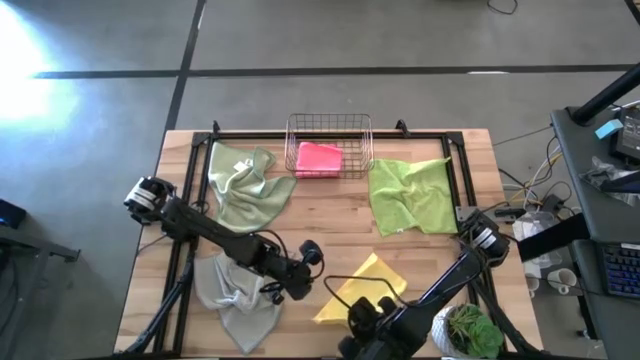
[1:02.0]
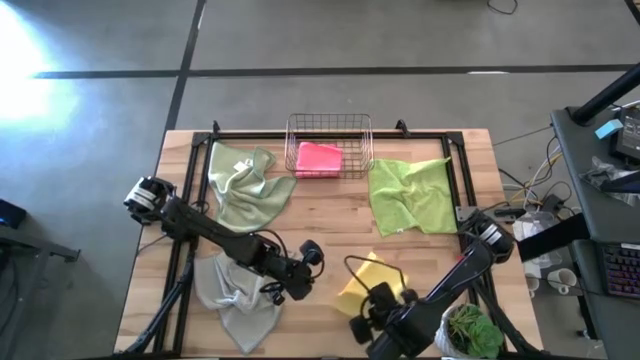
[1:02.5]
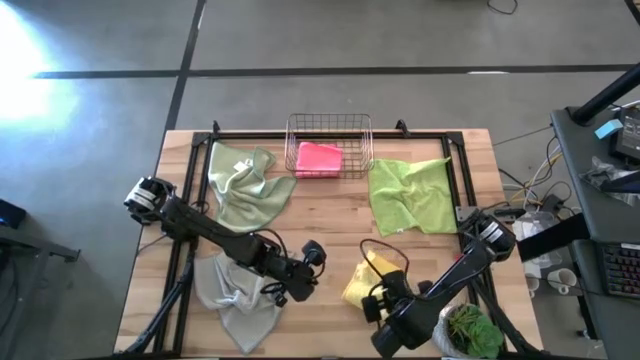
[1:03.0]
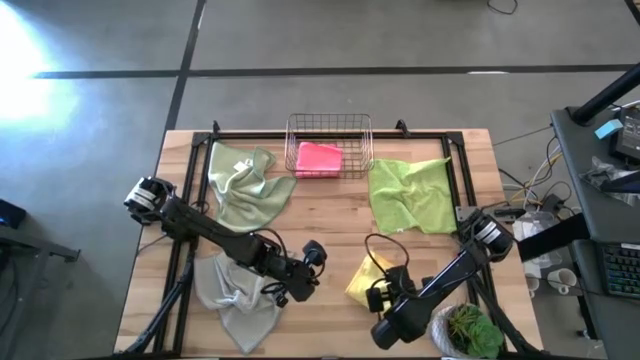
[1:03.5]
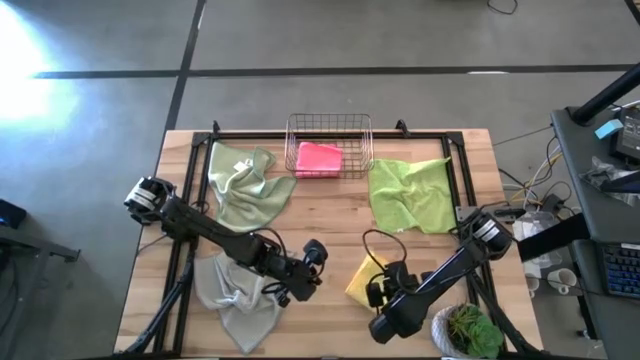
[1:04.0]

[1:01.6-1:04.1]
Task: Fold microfiber towels
Fold the yellow microfiber cloth

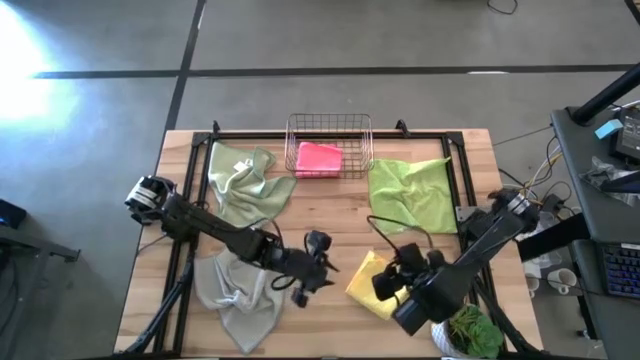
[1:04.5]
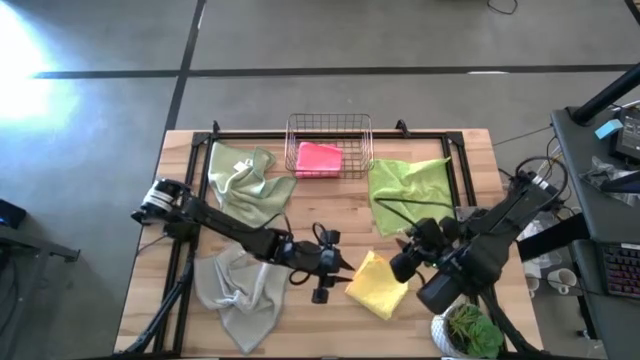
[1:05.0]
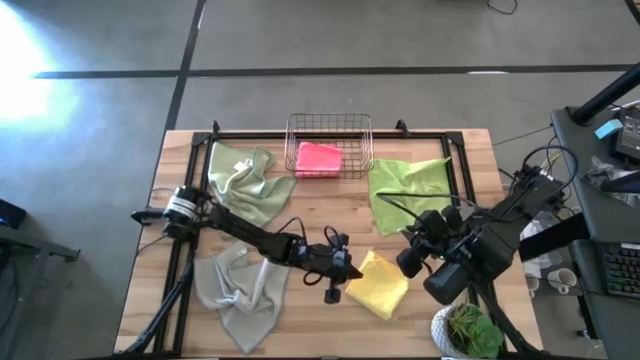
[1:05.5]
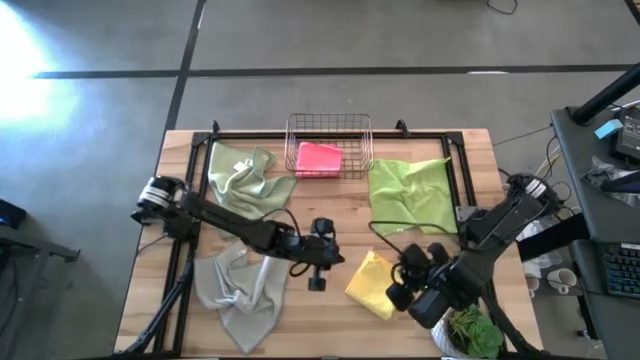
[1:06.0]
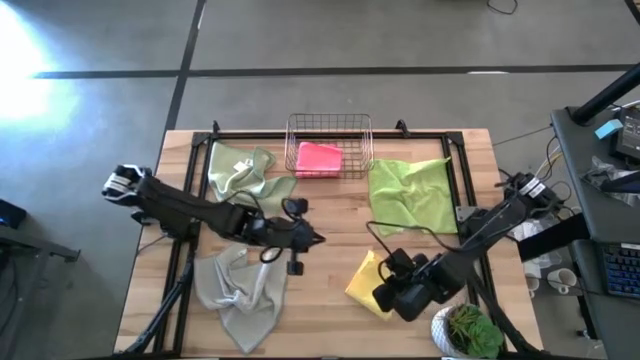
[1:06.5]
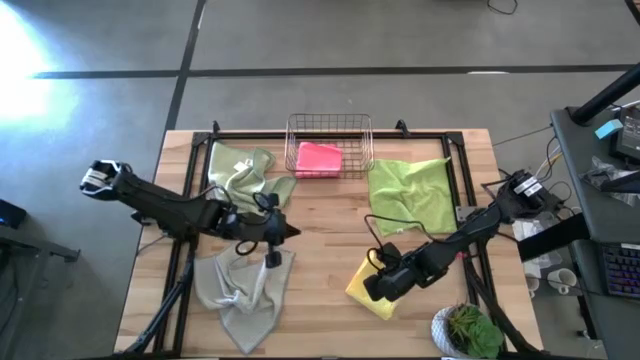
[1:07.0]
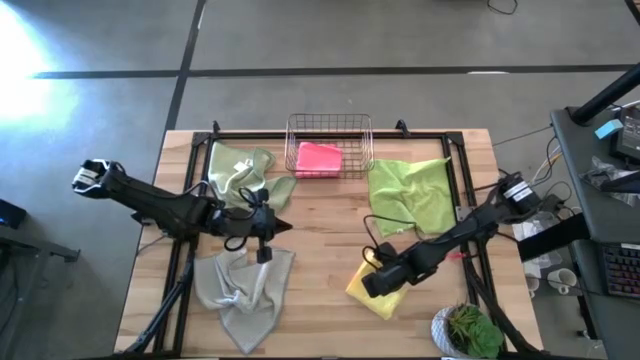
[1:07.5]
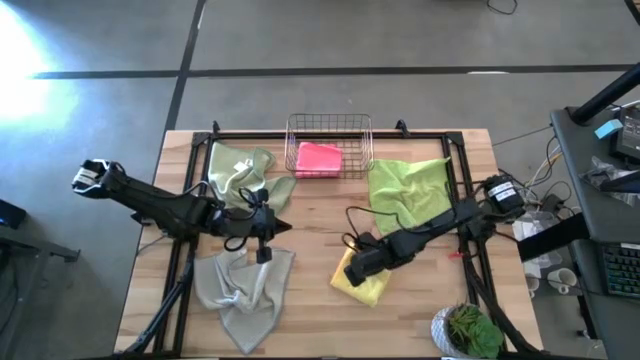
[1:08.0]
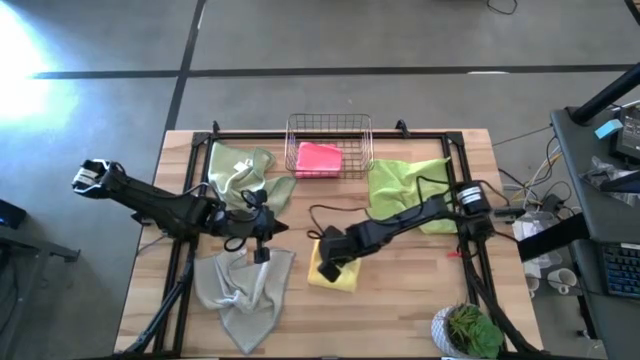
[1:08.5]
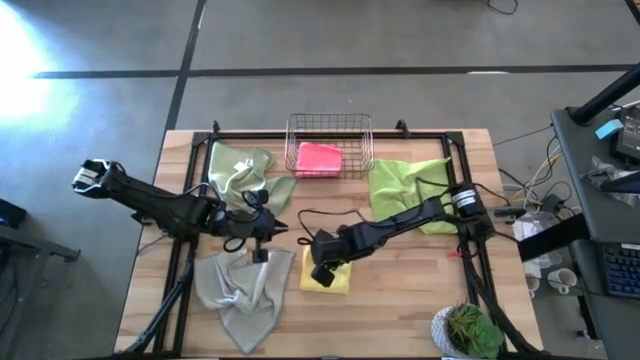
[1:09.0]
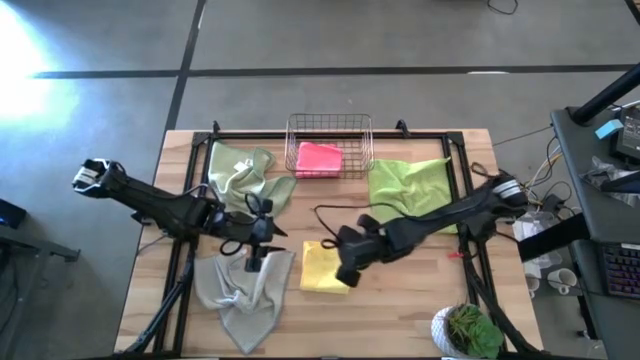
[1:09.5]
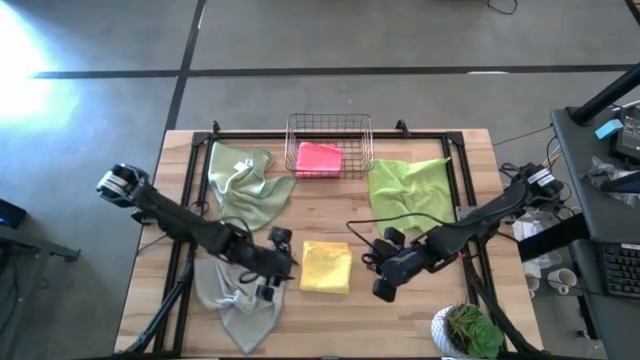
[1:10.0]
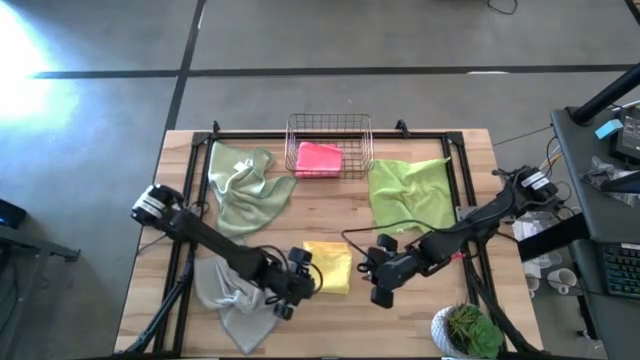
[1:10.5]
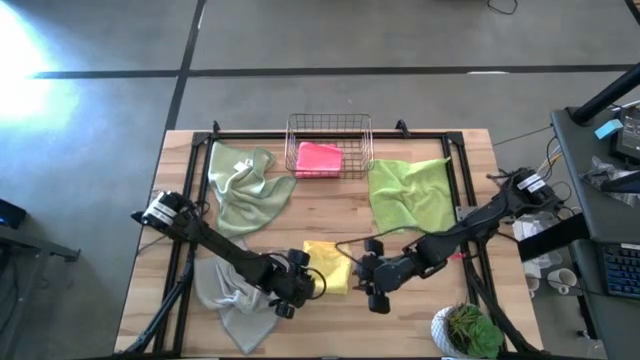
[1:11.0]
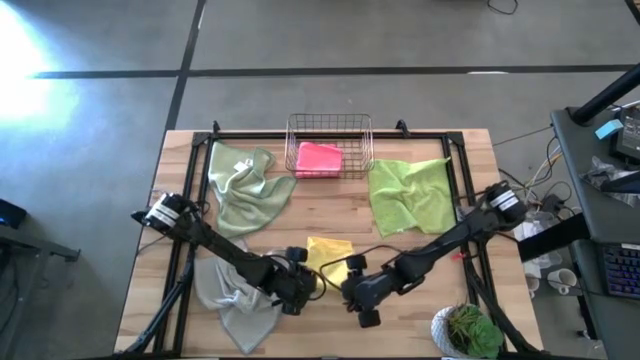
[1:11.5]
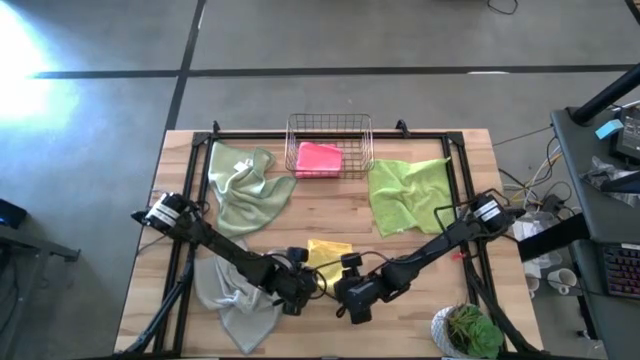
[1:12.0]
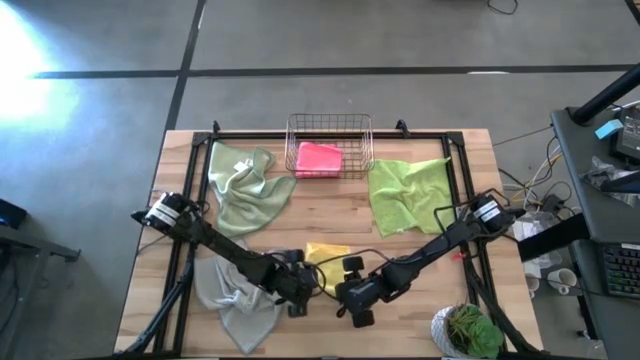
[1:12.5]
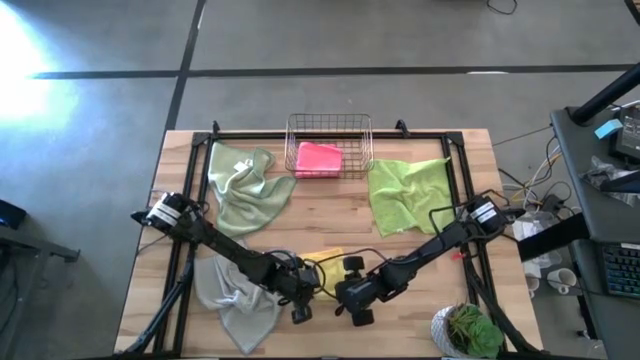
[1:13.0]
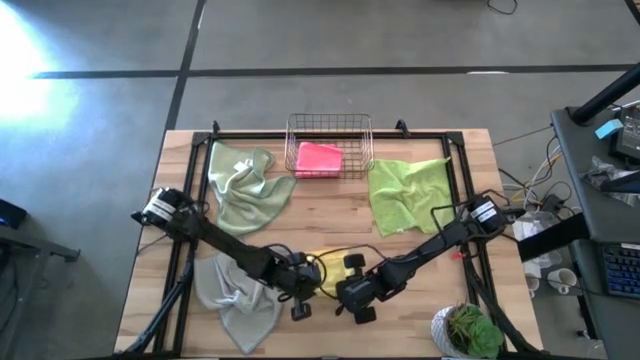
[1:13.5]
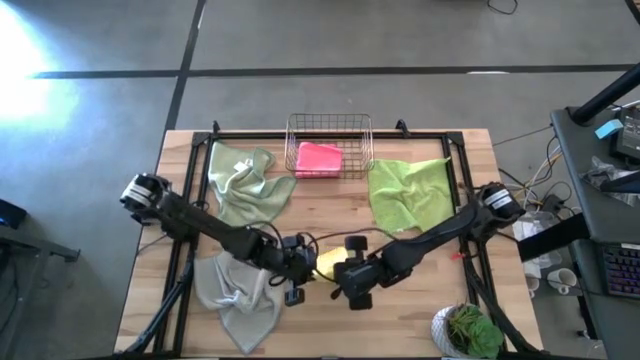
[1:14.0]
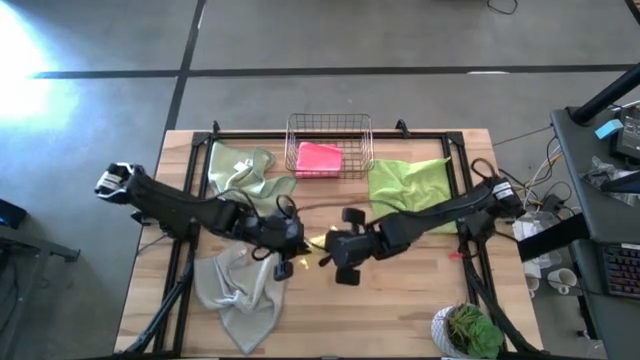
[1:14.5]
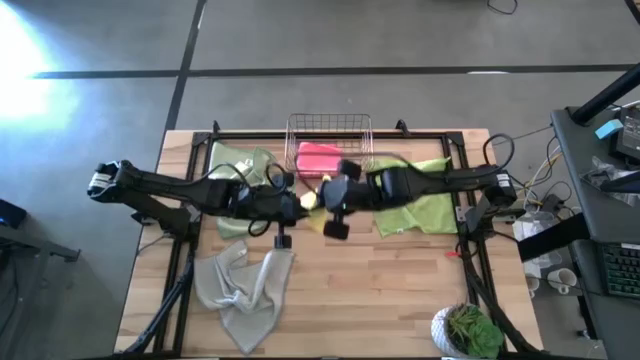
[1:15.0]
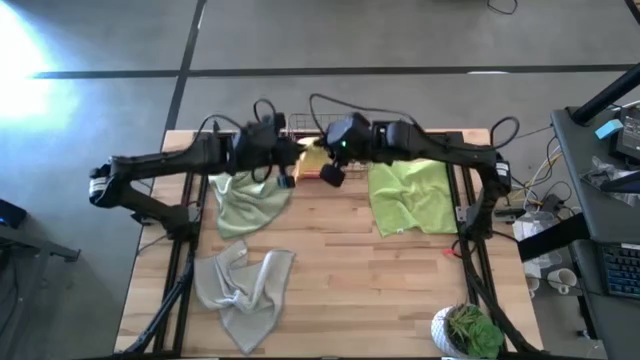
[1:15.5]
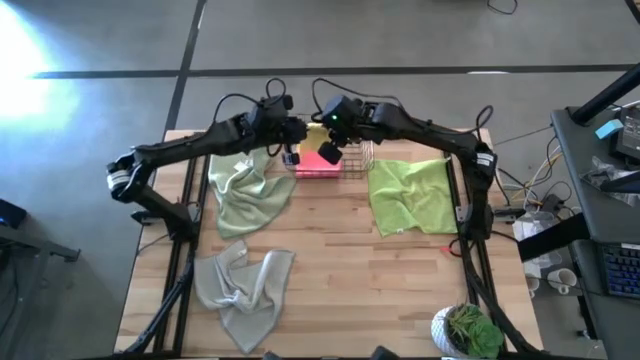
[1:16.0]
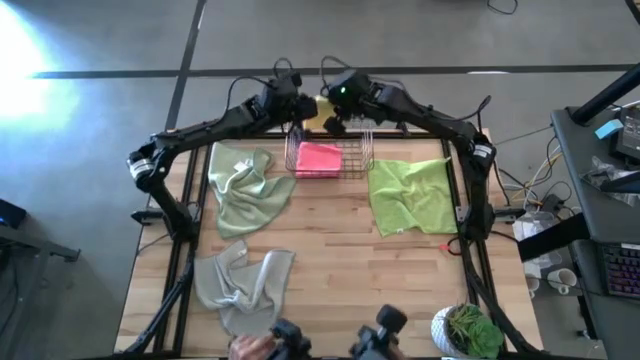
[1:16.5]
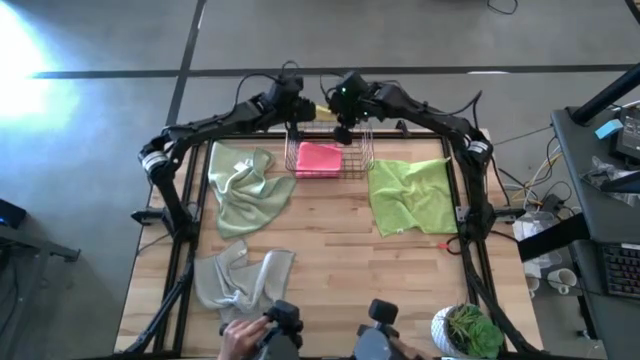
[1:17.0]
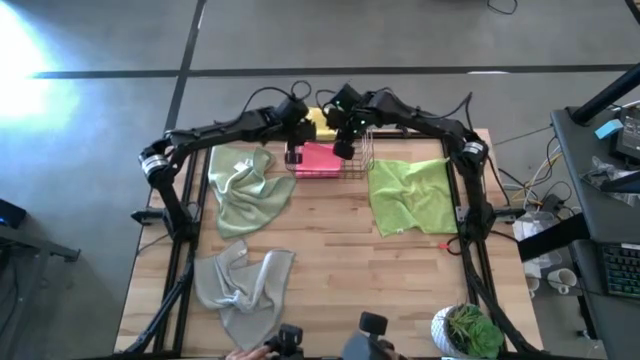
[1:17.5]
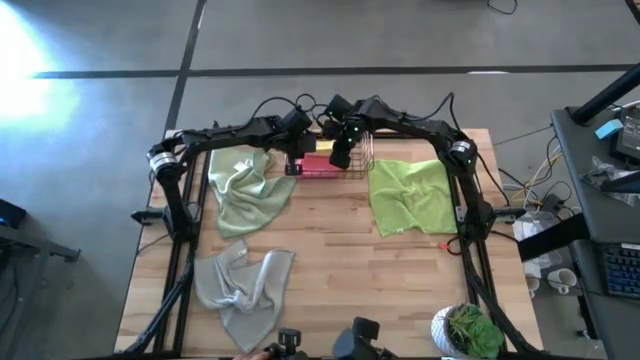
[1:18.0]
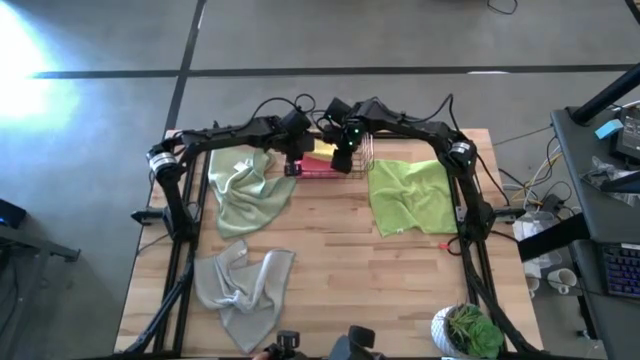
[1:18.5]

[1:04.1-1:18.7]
Stack the folded yellow microfiber cloth on top of the pink microfiber cloth in the wire basket

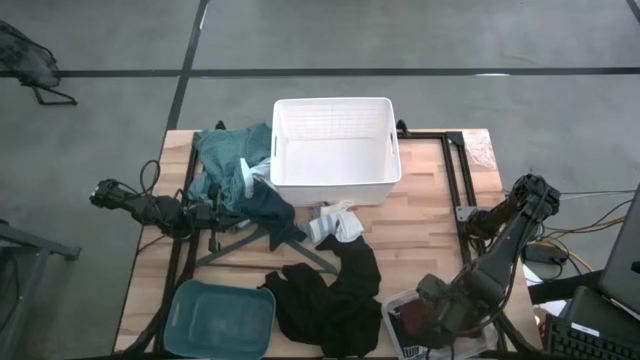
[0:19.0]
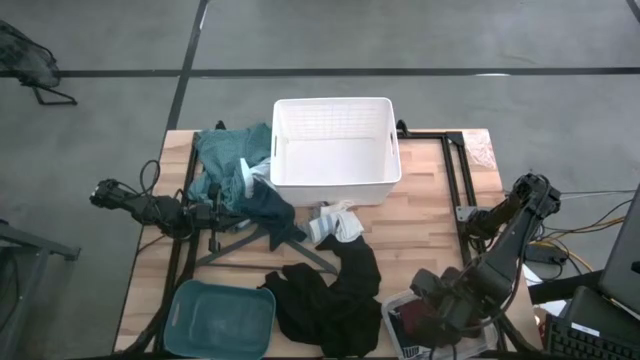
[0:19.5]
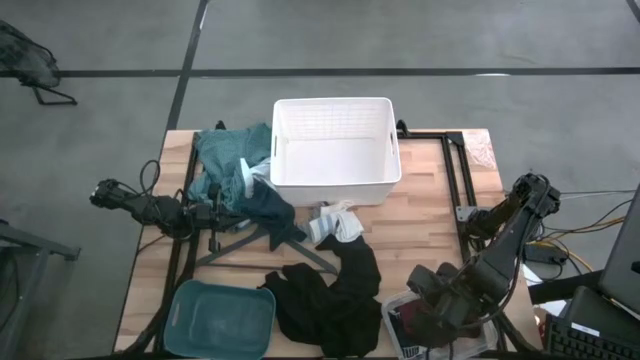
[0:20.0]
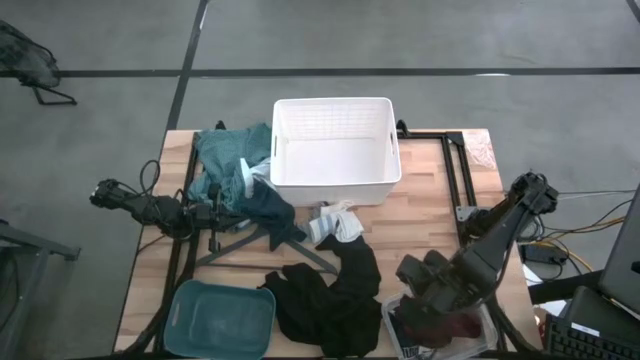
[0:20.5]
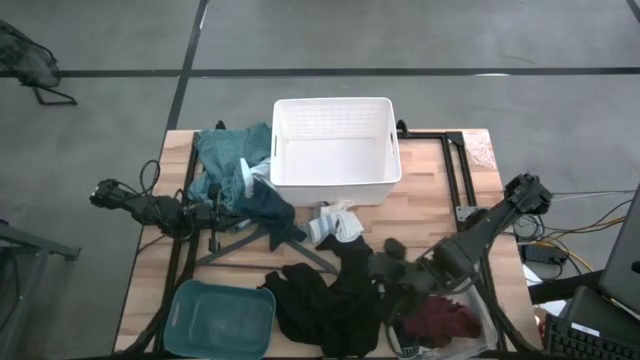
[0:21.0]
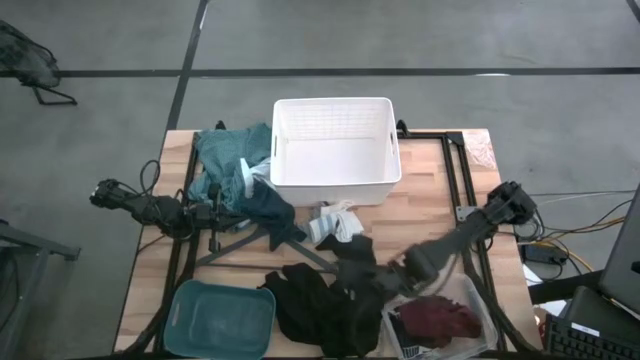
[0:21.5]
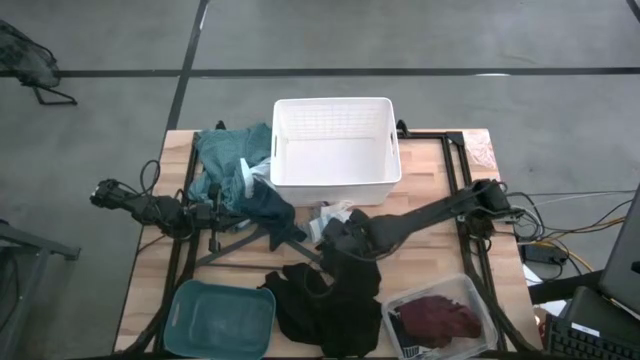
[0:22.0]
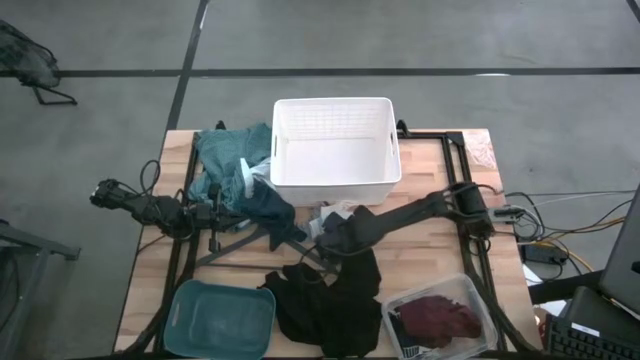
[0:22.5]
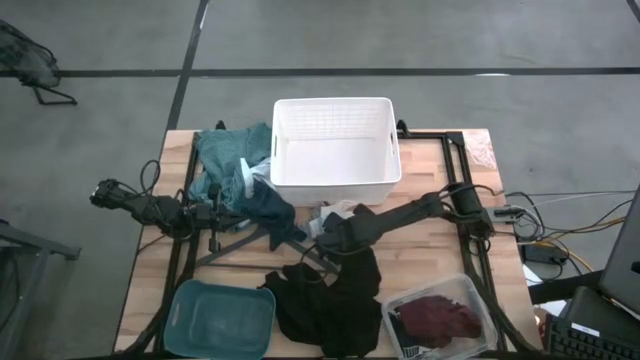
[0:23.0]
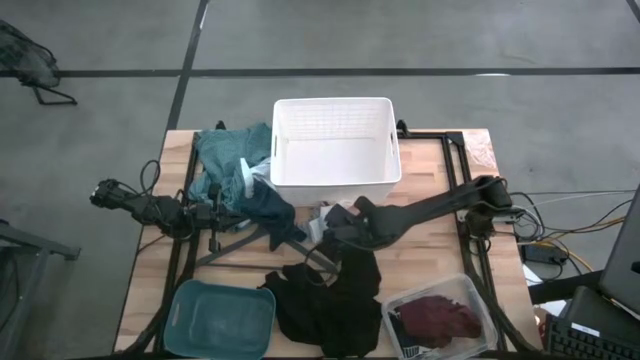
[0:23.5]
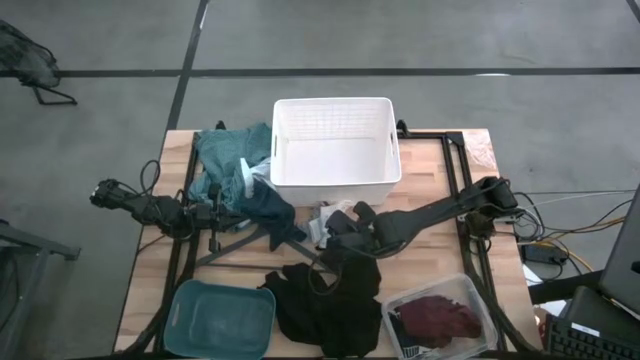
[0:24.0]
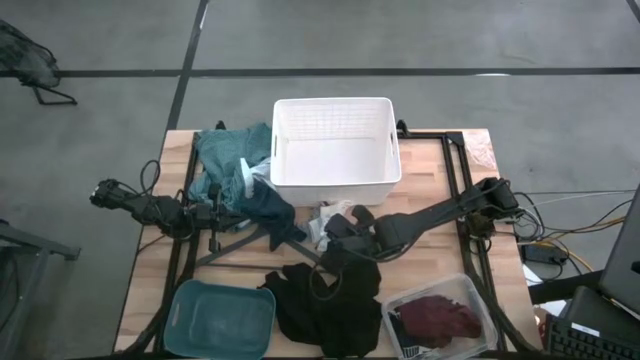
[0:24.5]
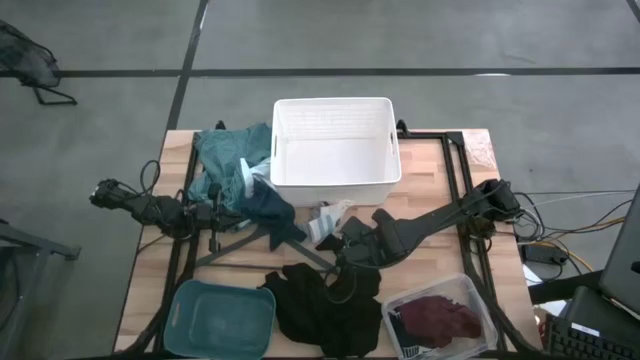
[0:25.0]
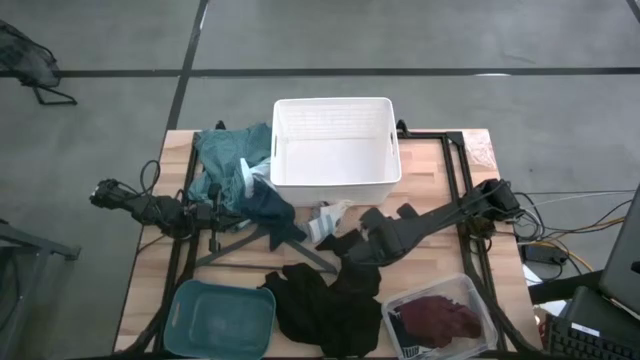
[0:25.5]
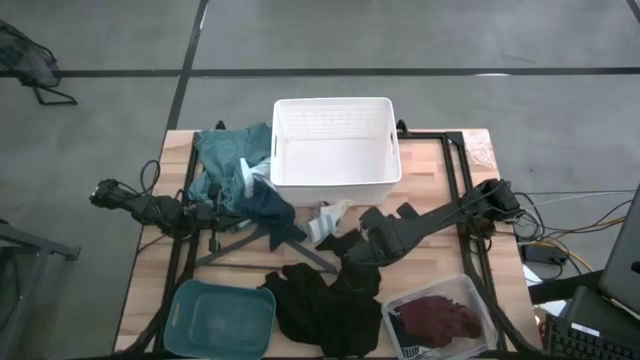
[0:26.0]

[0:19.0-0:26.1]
Task: Pick & Place Cloths
Adjust the white sock on the table
